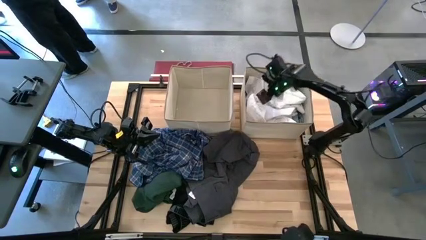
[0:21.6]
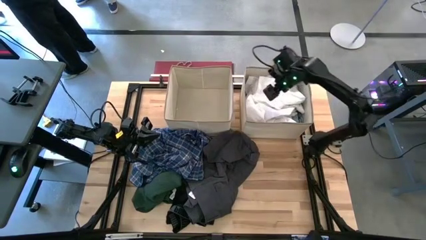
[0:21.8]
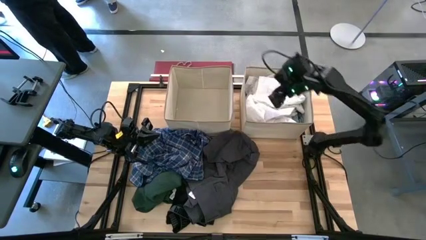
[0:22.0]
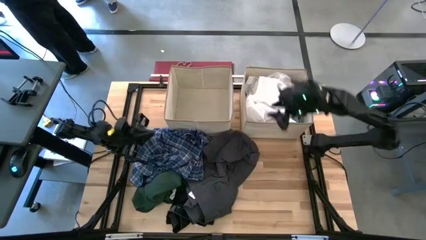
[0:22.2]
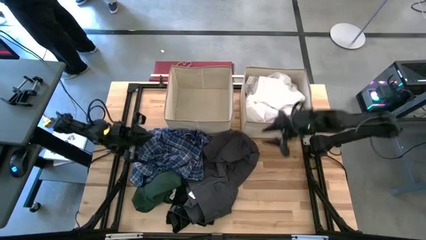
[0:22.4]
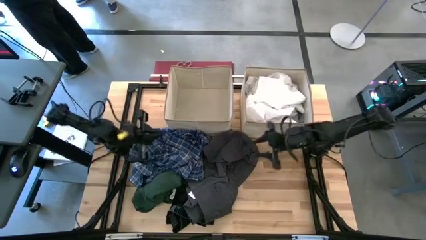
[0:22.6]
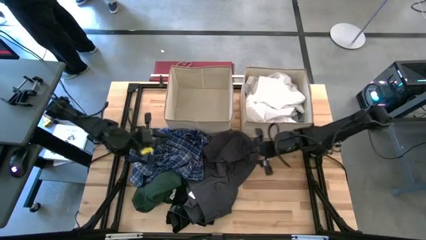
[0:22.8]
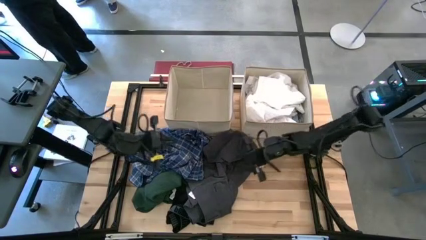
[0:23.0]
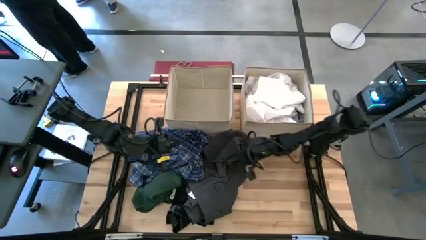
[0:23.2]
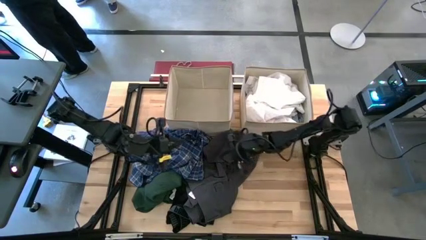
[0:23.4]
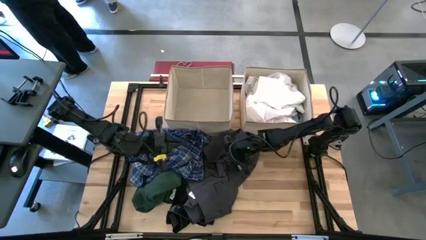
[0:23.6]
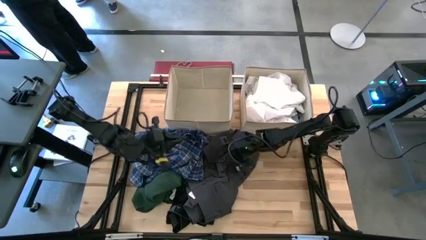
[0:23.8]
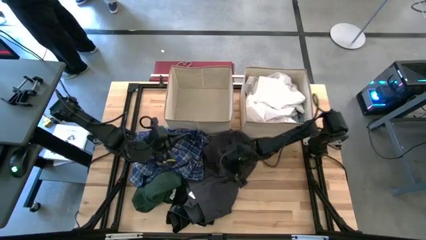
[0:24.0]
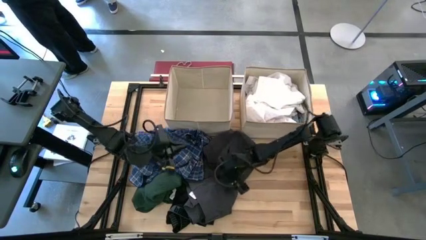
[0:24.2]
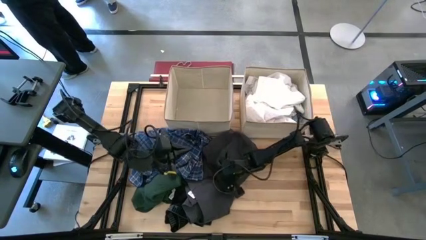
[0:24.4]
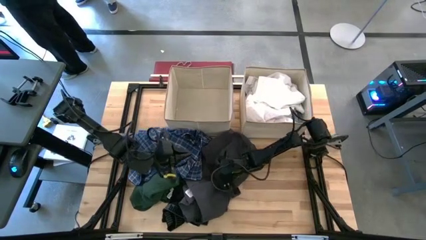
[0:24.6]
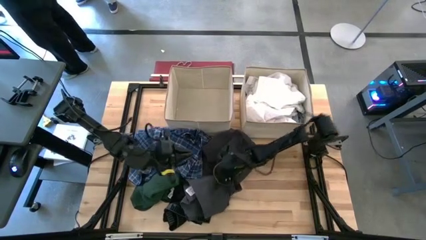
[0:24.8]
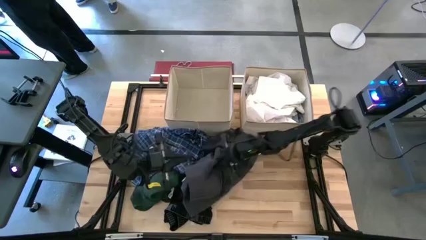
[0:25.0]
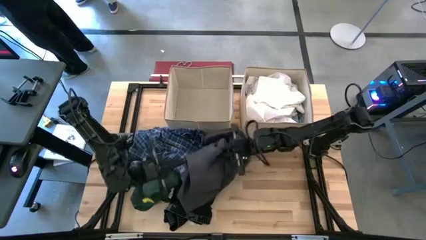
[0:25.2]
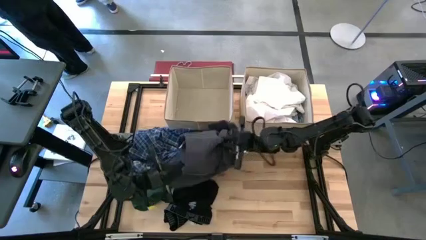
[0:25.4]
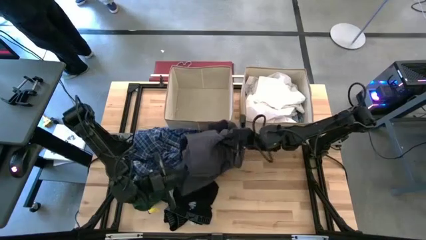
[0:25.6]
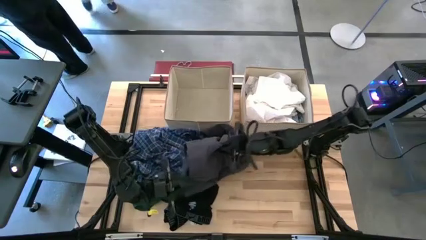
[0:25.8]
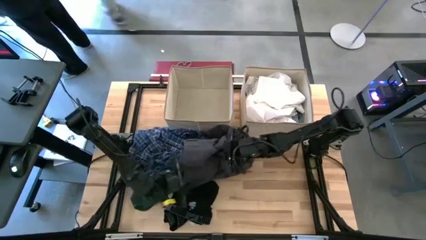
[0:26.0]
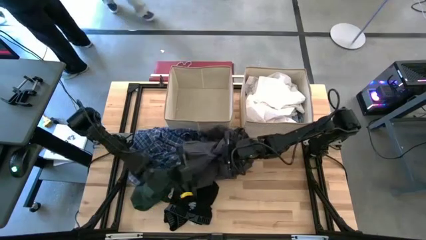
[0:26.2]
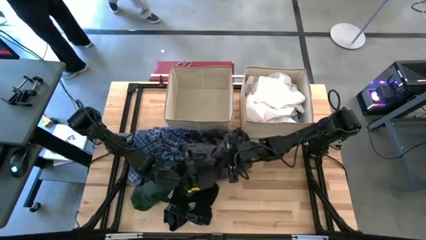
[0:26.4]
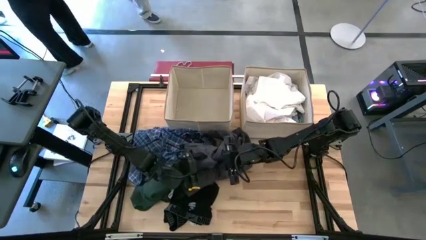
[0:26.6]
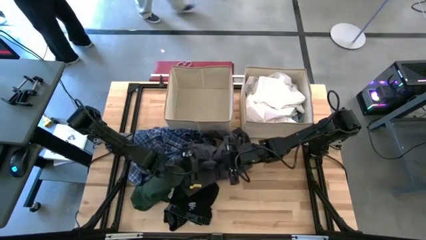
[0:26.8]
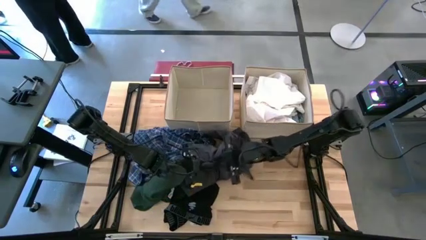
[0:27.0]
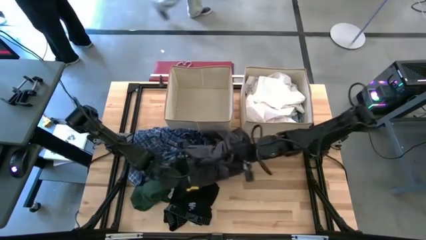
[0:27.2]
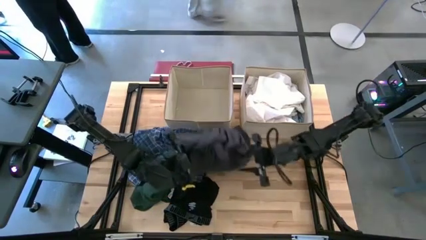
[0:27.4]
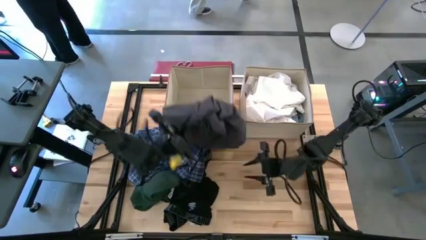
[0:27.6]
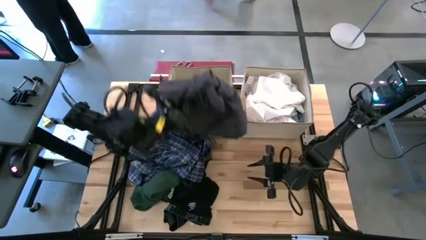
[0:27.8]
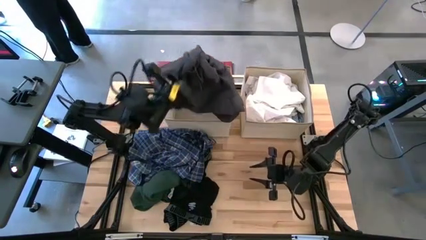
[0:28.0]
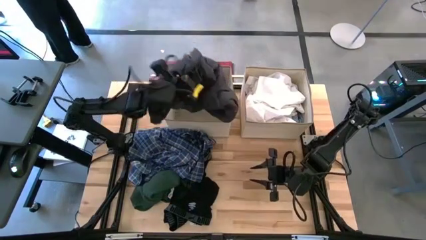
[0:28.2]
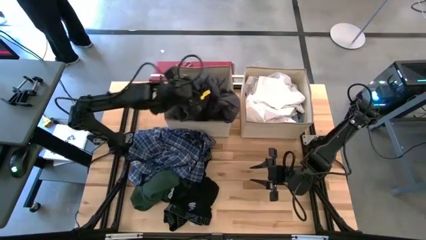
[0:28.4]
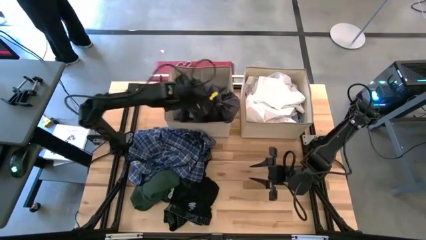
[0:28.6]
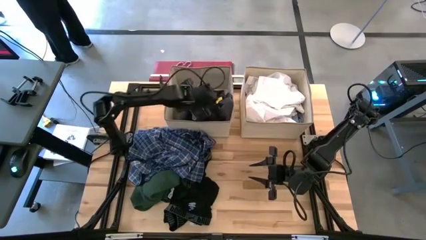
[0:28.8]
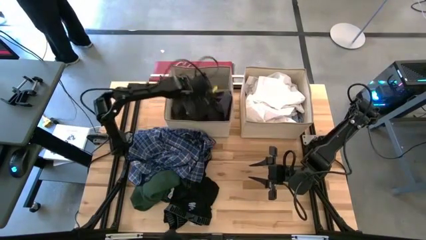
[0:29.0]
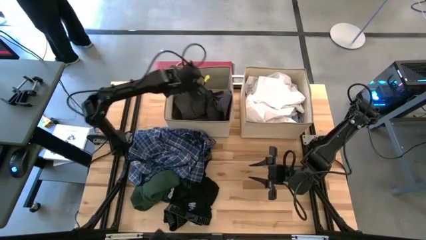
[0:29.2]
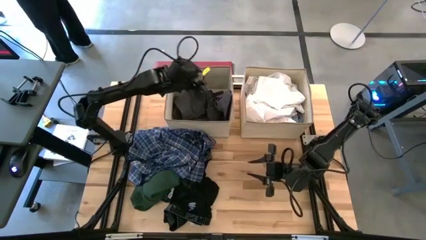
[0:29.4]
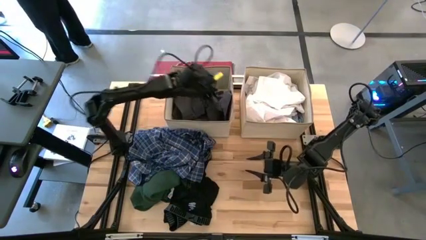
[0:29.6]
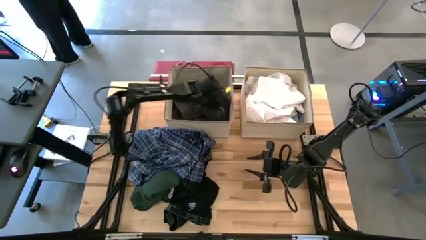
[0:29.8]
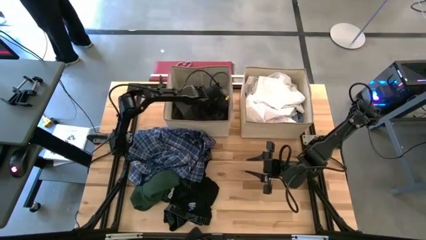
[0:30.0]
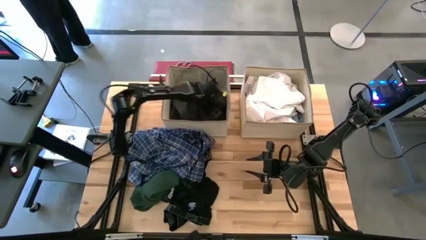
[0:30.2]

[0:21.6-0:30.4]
Task: Sort clothes
Put the brown shorts into the left brown bin

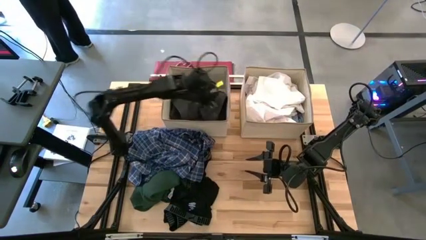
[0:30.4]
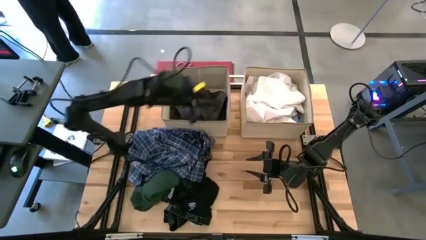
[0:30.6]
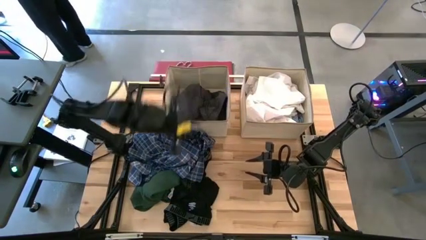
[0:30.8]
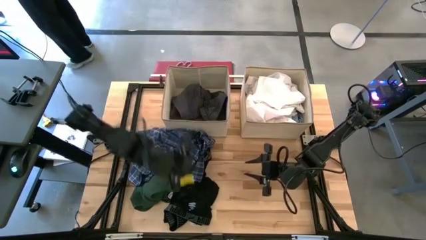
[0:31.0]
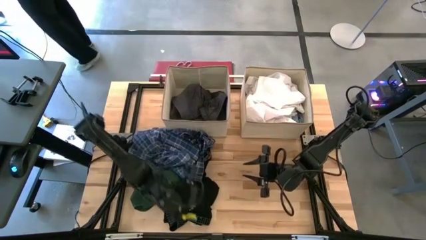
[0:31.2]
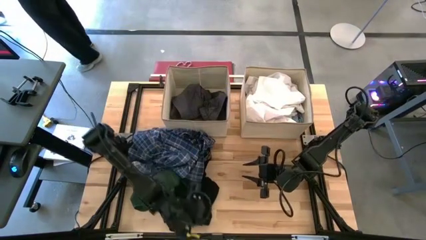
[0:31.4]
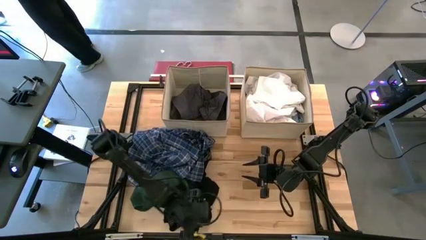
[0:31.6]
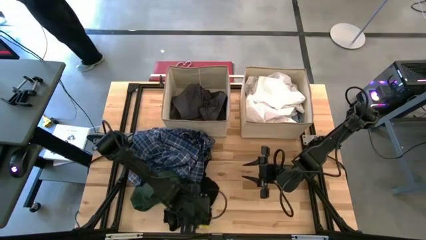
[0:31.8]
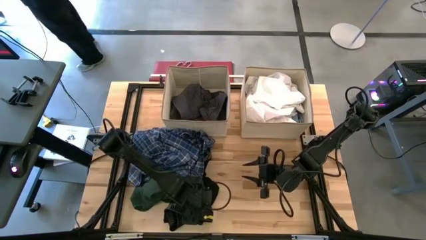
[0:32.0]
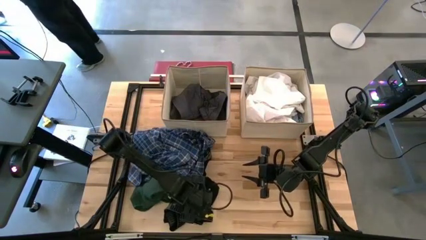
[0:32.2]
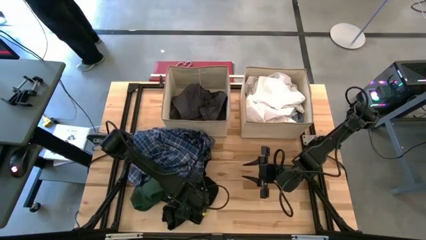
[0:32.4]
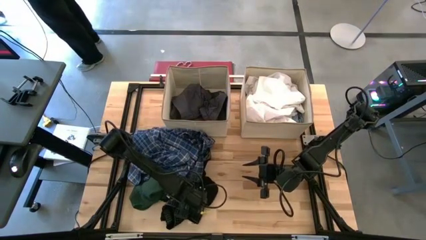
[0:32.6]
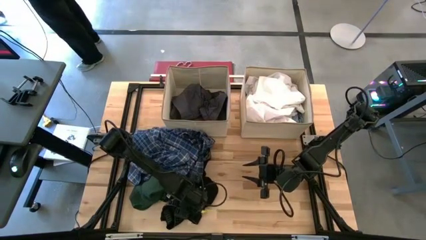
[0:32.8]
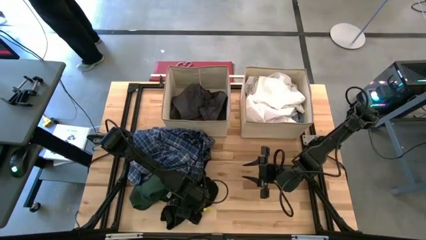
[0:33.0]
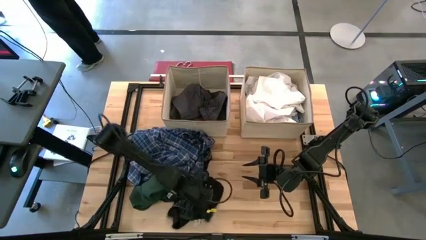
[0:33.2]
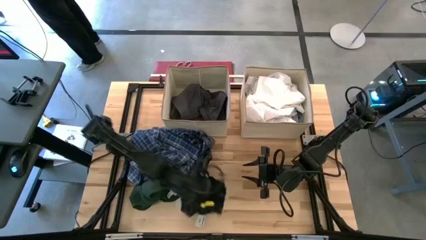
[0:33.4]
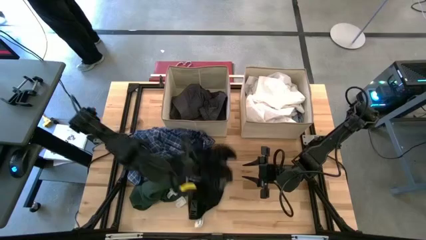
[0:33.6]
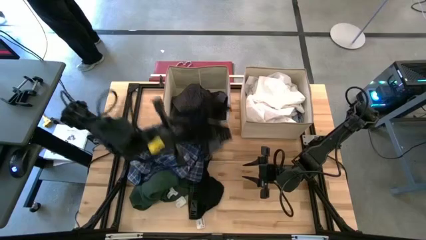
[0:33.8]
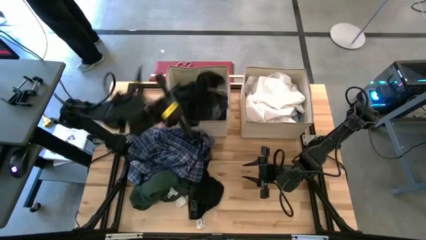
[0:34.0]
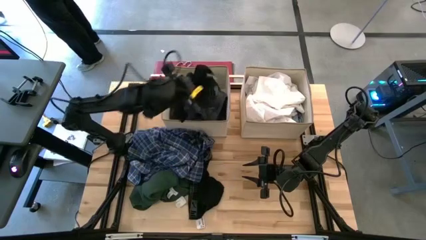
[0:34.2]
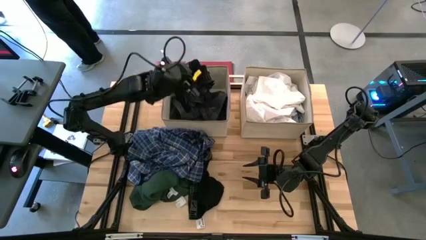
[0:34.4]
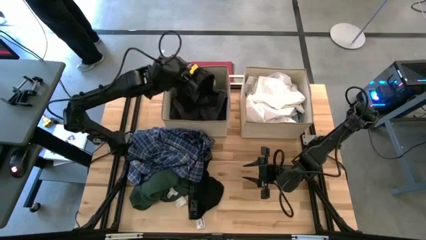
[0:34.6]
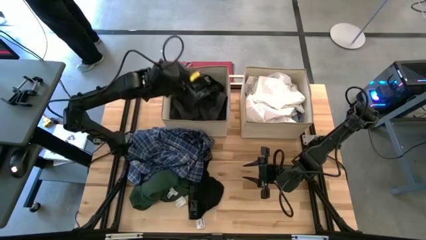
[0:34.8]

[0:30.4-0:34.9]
Put the black underwear into the left brown bin

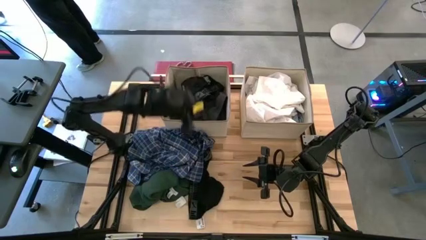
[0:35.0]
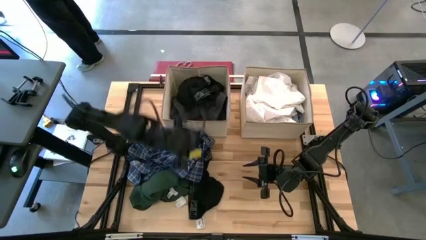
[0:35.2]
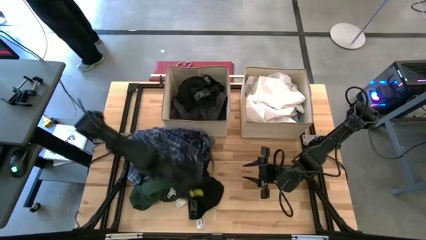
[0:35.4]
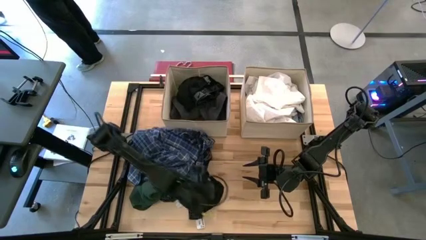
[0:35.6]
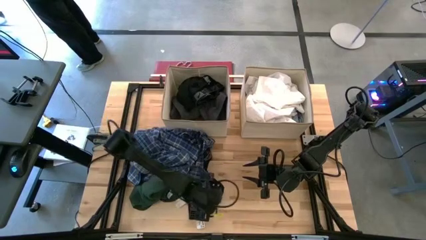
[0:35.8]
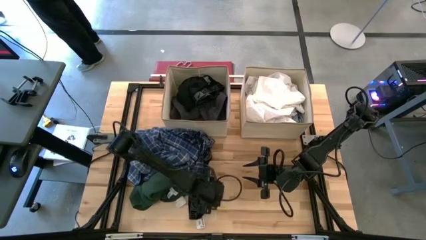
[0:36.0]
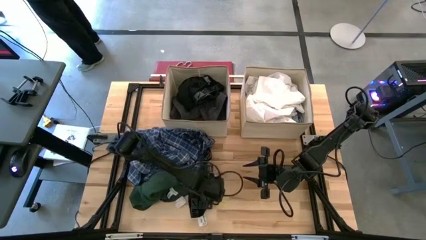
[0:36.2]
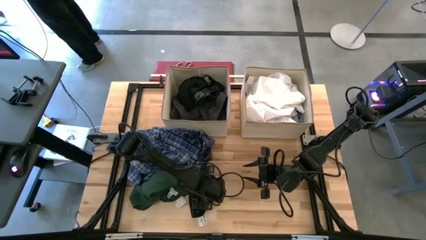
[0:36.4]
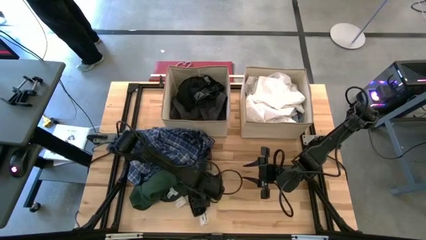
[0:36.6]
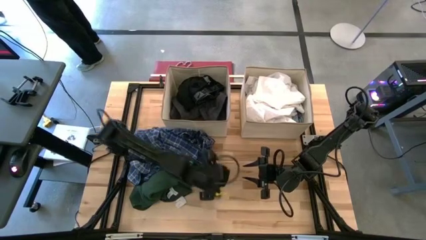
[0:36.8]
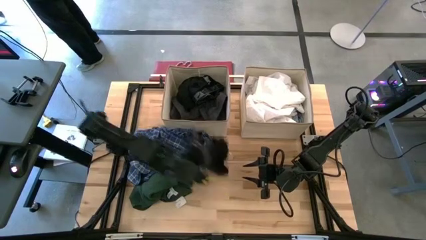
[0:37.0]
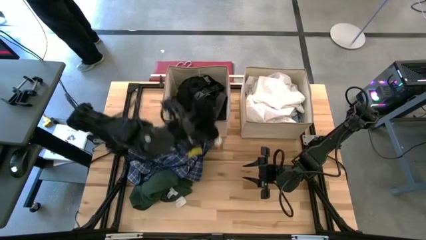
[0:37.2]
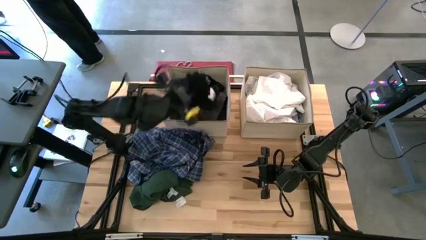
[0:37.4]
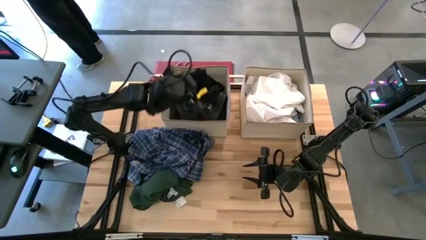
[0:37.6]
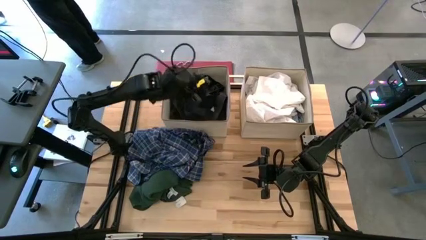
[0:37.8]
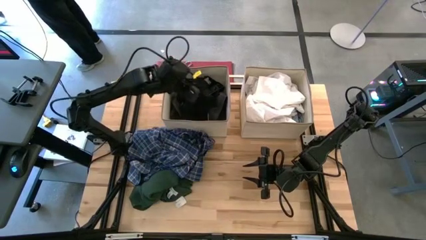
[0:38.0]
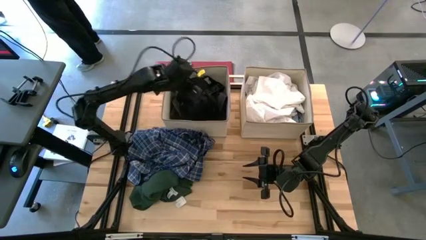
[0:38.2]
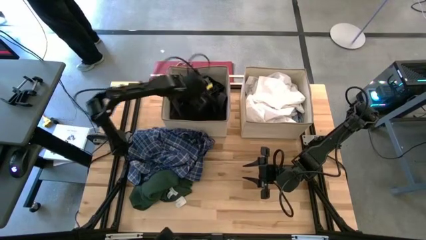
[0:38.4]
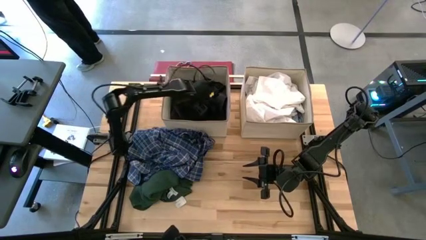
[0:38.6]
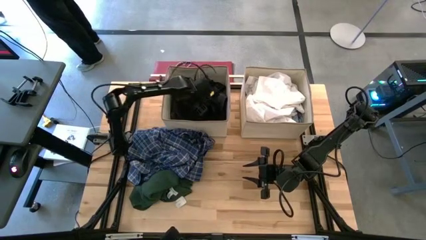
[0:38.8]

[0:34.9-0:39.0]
Put the black underwear into the left brown bin
